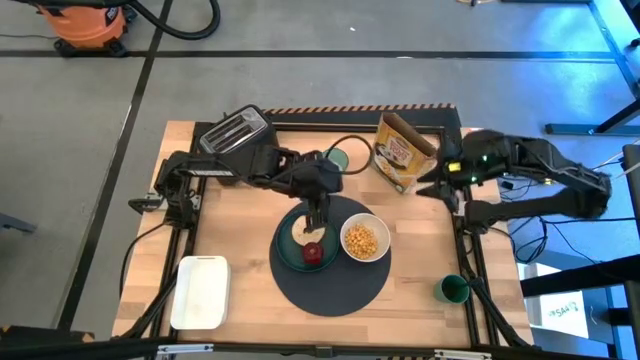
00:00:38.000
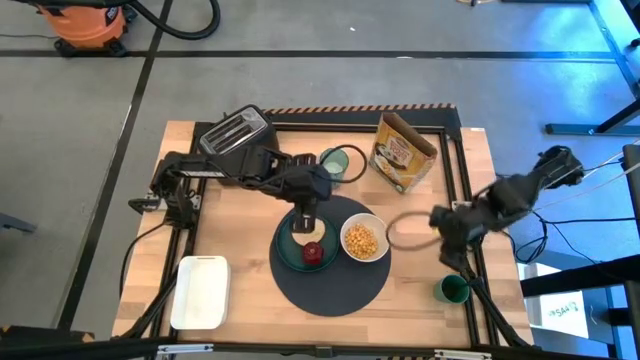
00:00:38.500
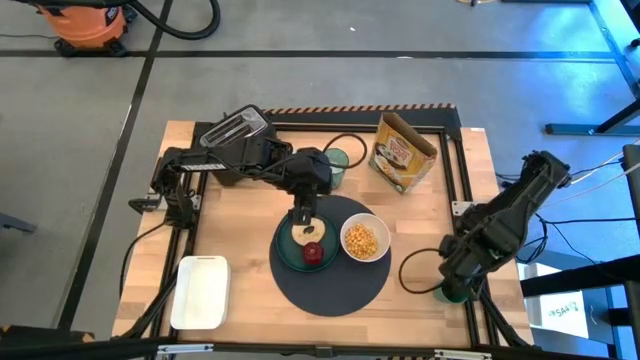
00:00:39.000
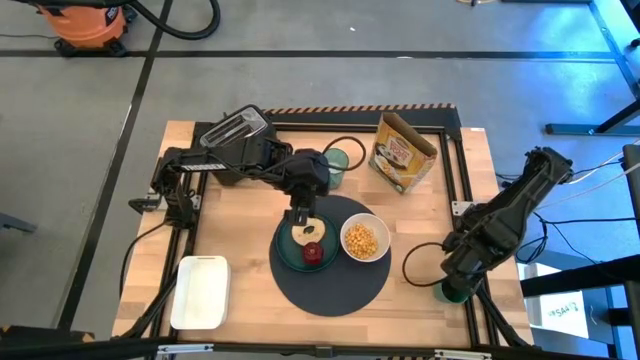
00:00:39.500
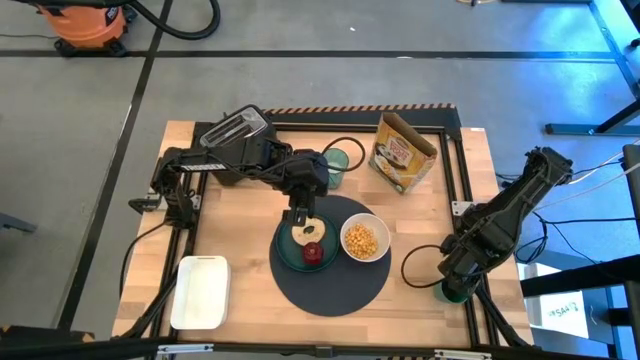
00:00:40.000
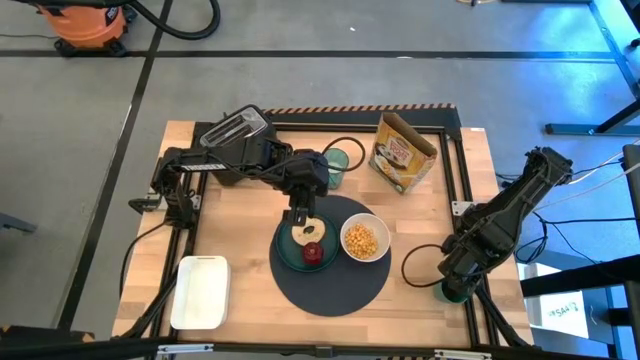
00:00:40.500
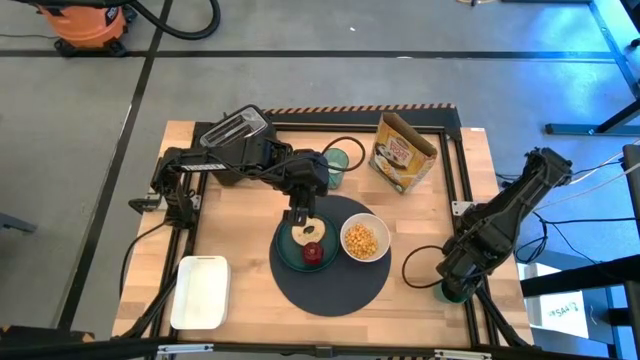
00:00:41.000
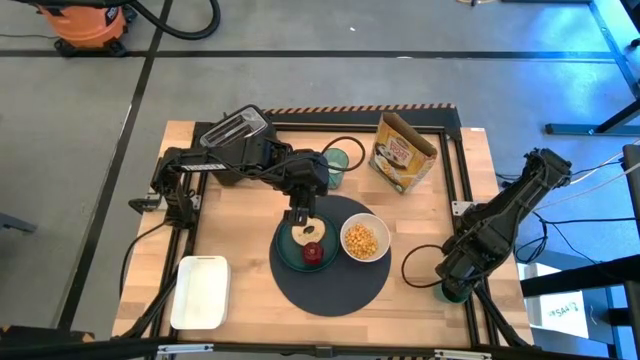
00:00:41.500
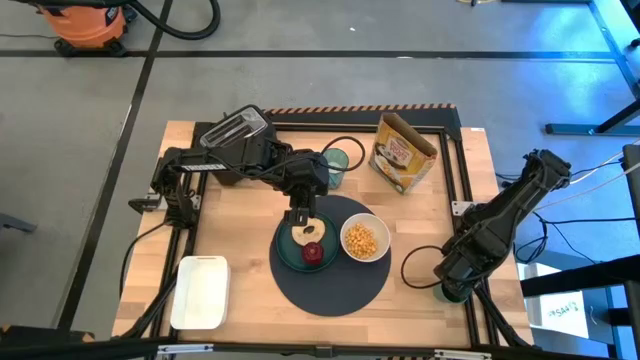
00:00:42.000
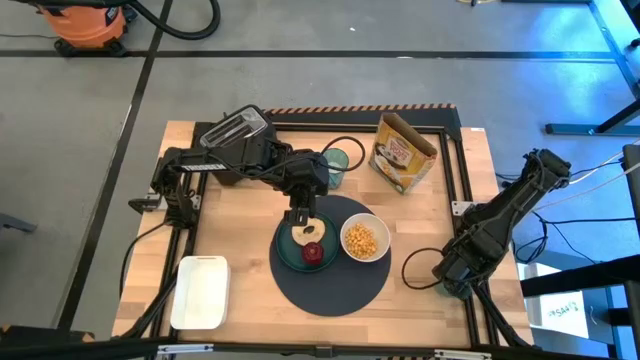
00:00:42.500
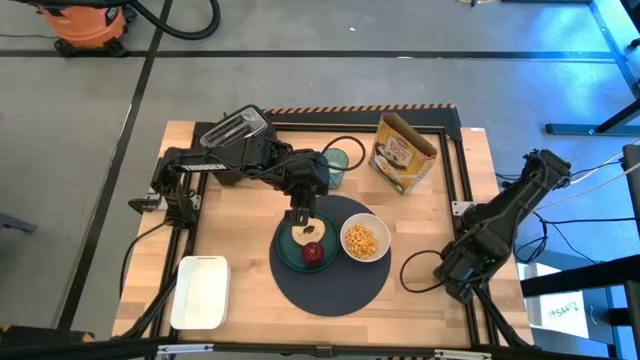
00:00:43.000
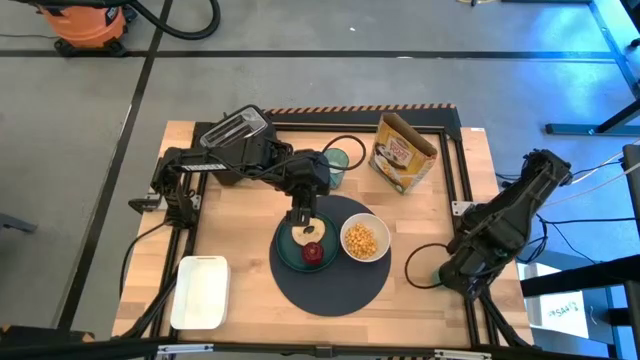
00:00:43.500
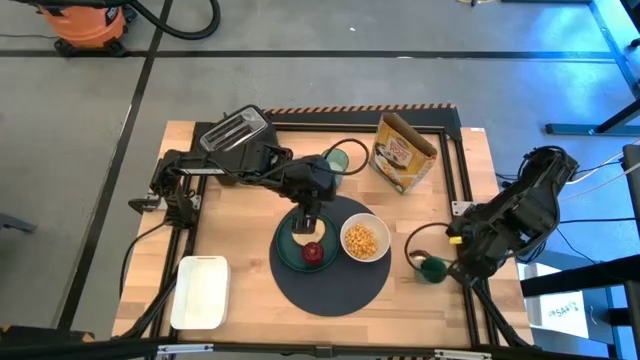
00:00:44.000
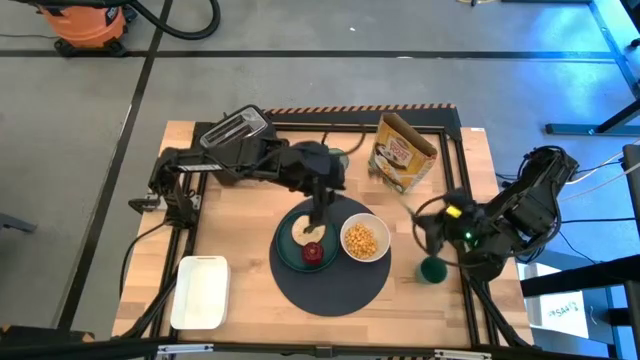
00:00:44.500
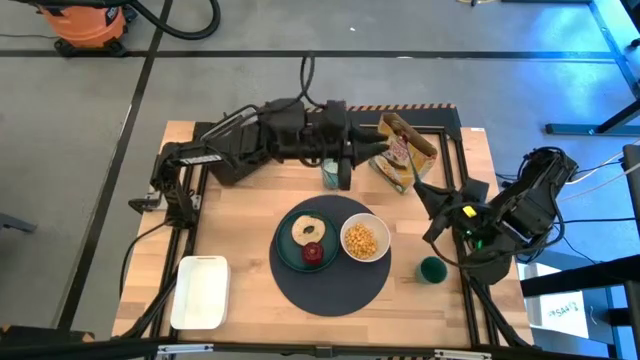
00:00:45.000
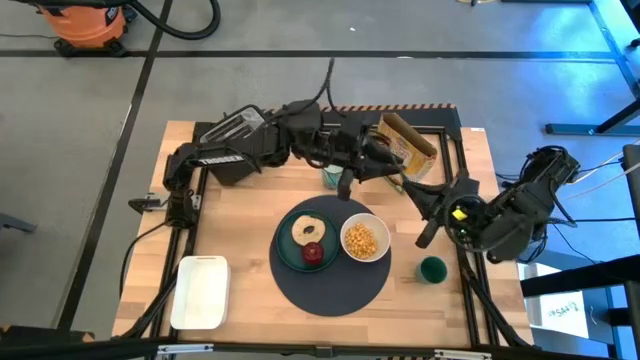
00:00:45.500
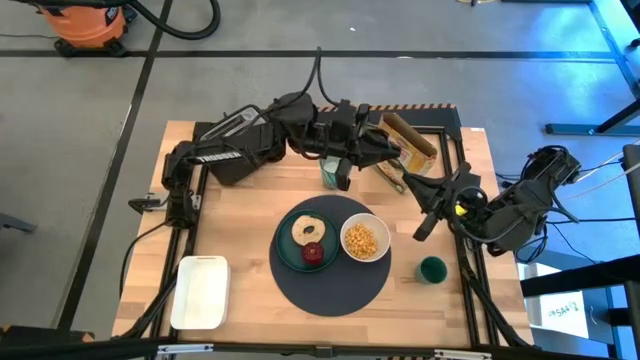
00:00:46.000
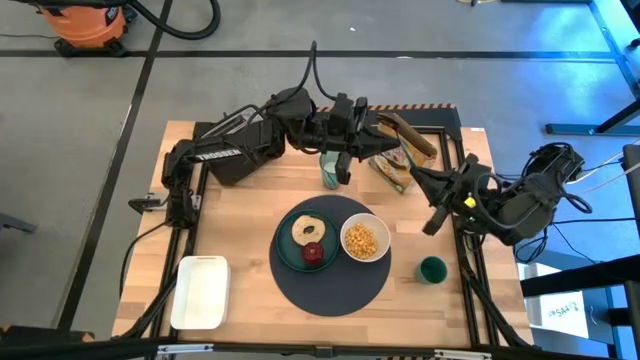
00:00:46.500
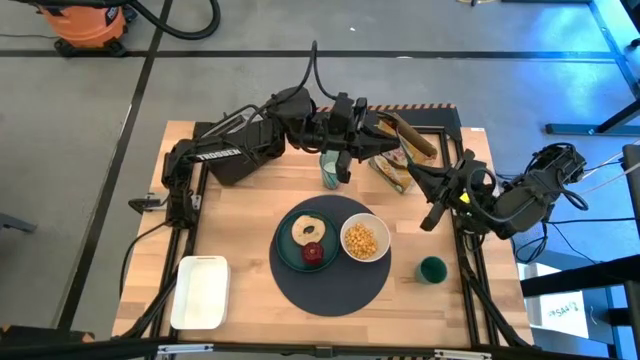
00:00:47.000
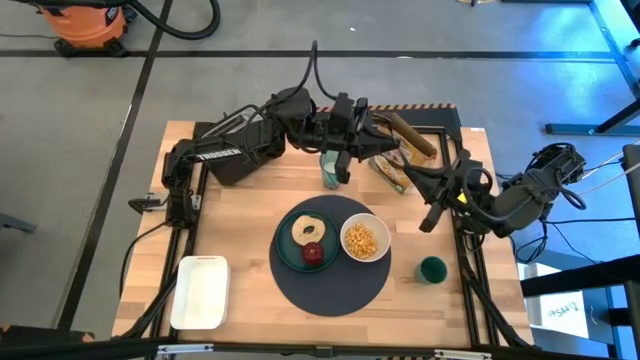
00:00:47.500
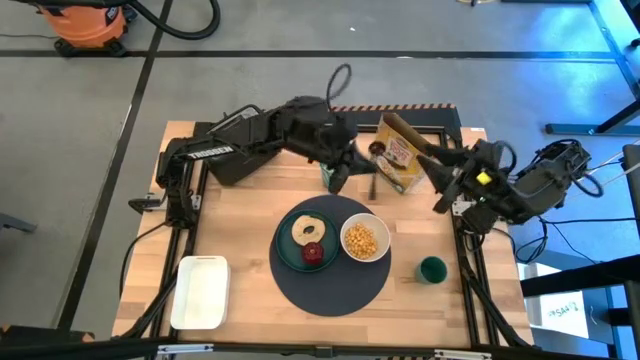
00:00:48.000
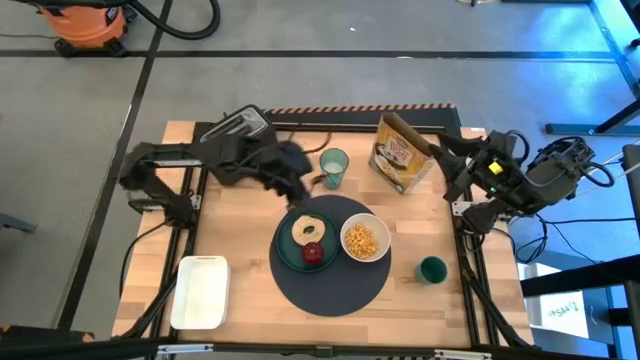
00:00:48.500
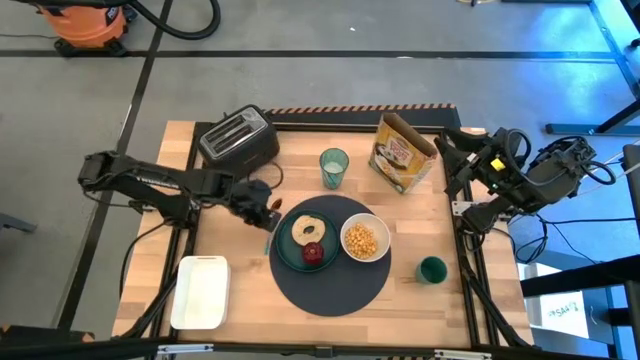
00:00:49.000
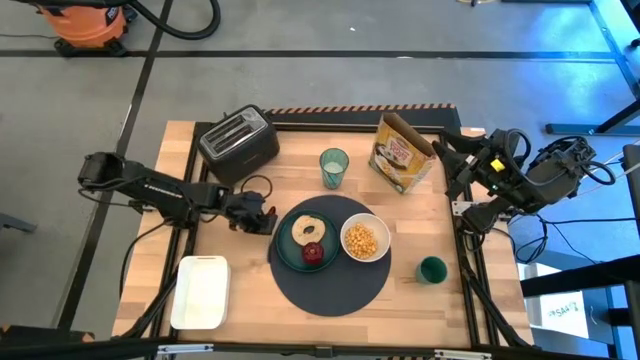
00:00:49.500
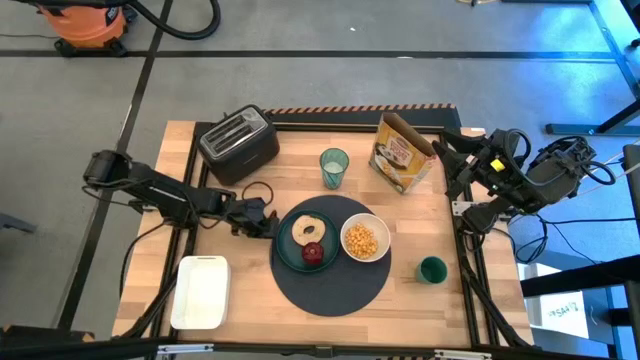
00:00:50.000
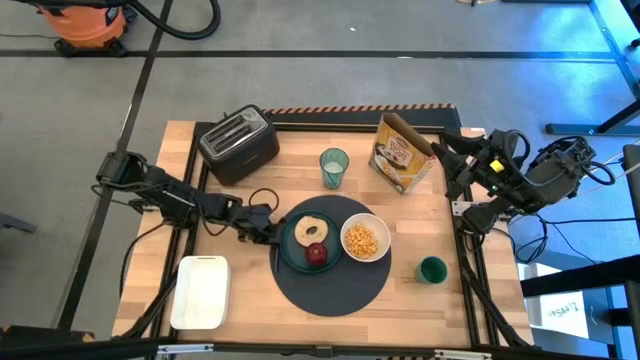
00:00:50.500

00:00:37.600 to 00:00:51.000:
Task: Arrange a breakfast setting
Put the spoon on the tablemat to the left of the green plate

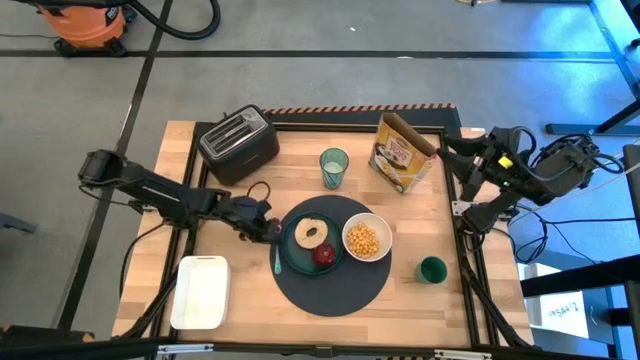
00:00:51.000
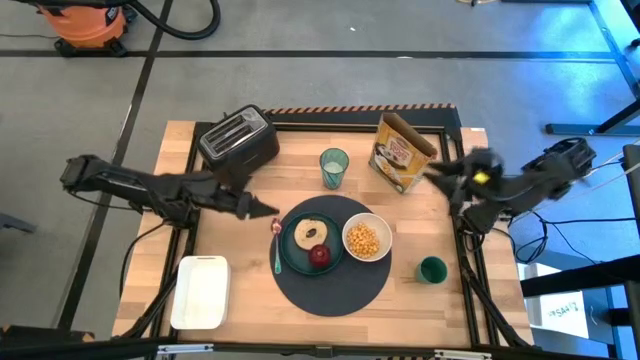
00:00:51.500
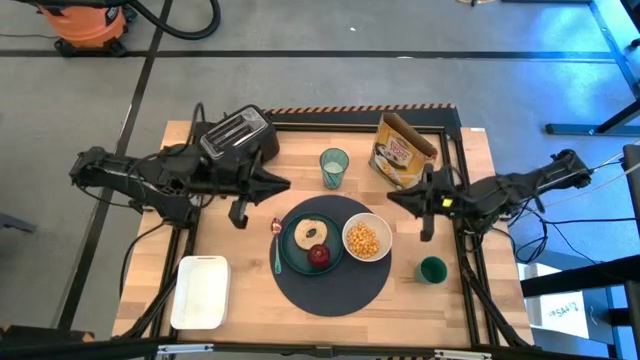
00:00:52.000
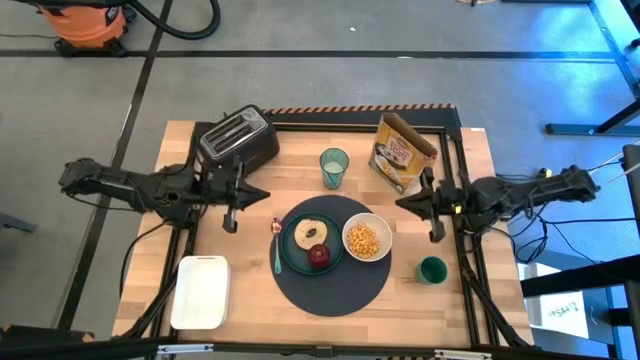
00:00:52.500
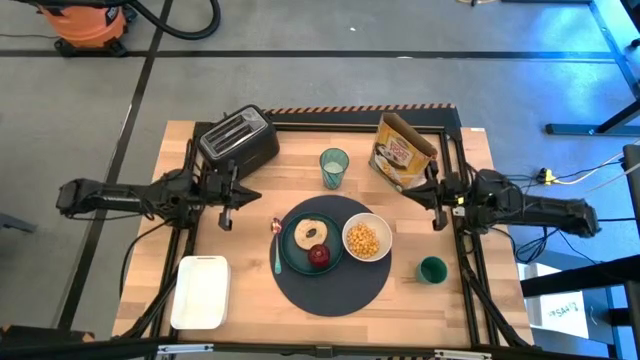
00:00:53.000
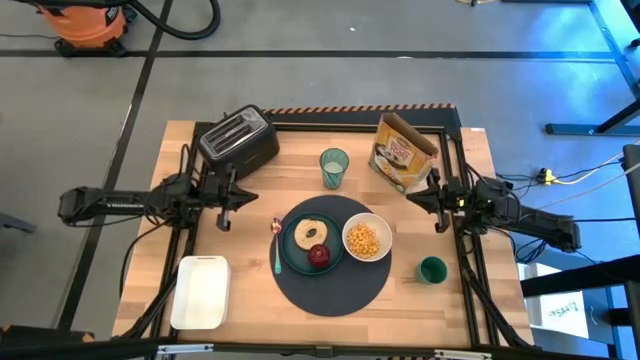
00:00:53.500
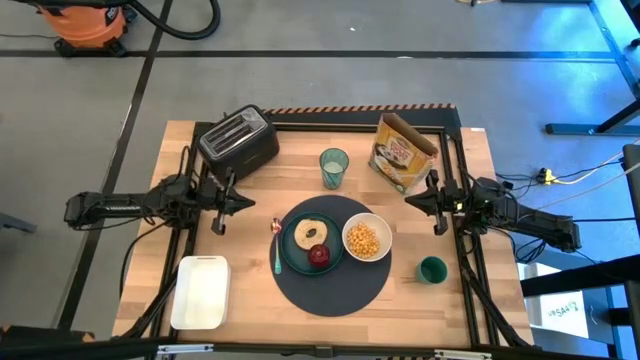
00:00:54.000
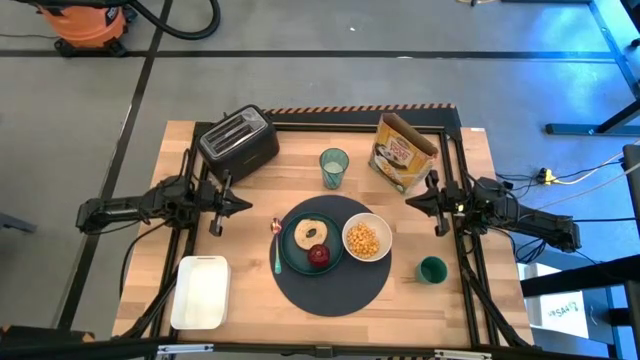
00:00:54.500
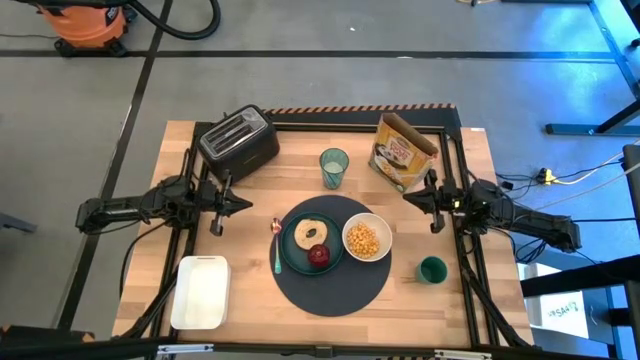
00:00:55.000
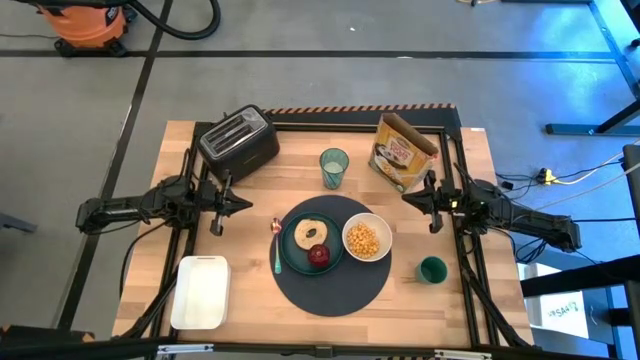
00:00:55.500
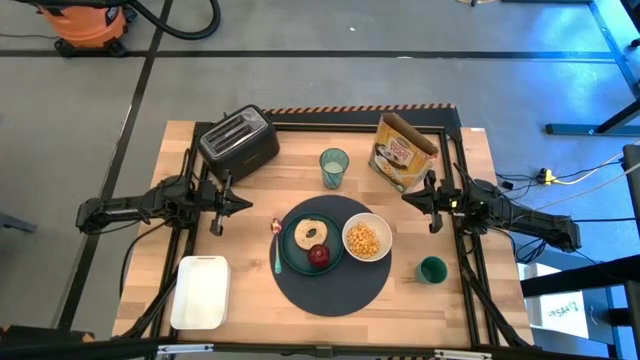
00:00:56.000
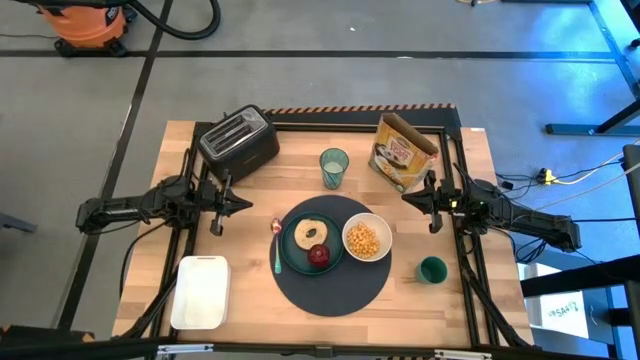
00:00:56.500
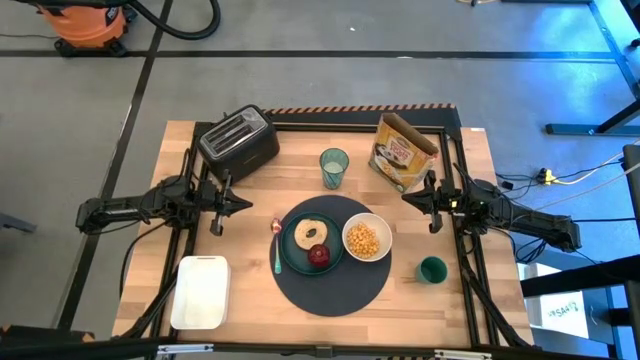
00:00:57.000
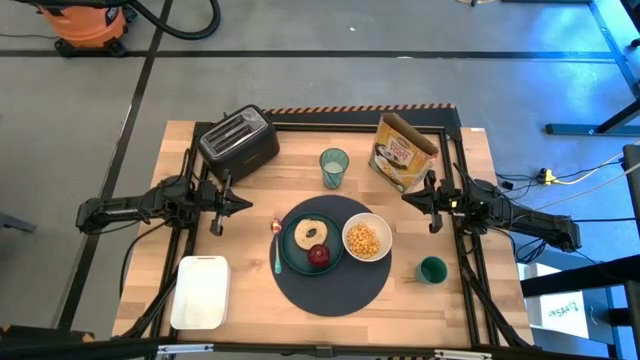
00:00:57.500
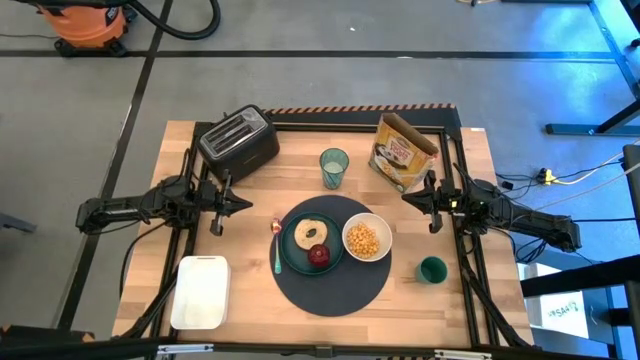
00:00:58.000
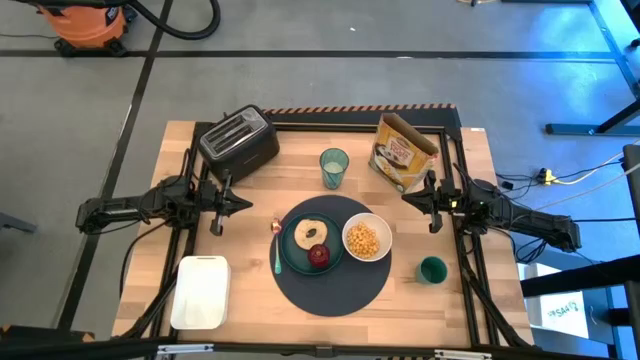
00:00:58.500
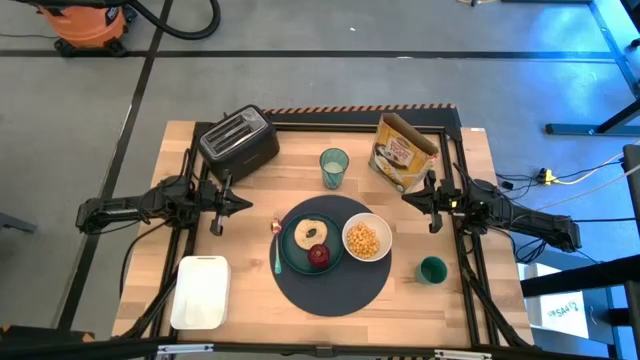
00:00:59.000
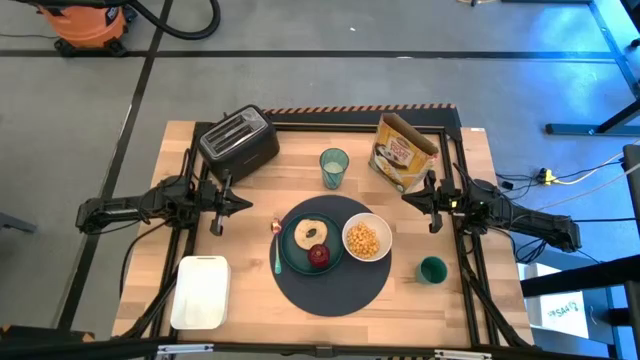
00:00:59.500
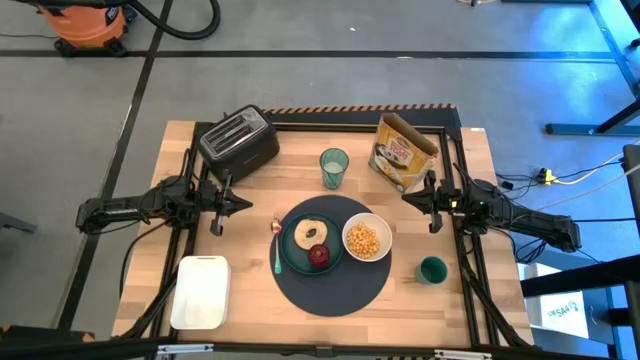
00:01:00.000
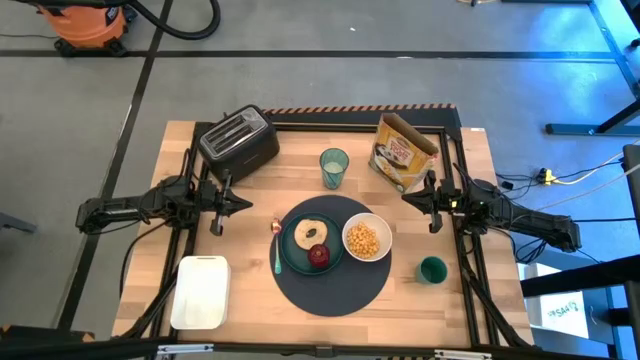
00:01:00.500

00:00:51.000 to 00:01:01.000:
Return to Home Position
